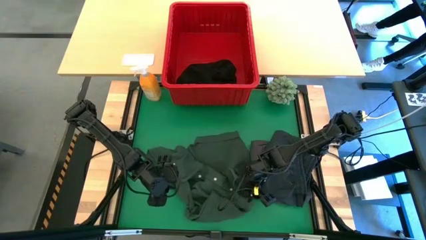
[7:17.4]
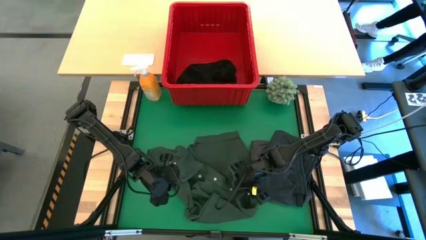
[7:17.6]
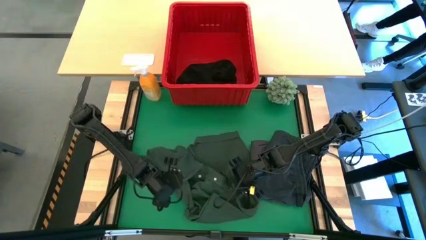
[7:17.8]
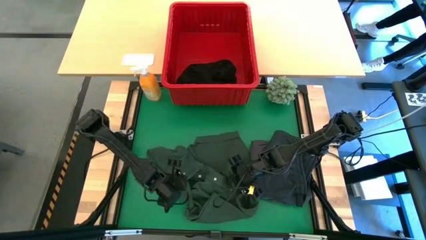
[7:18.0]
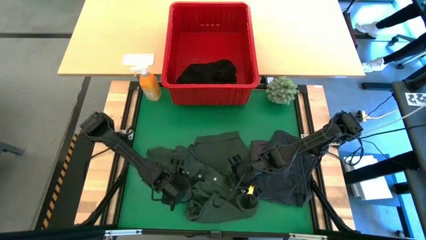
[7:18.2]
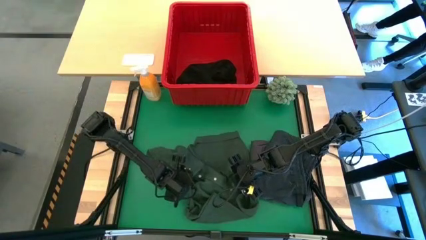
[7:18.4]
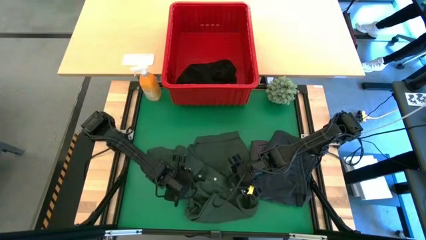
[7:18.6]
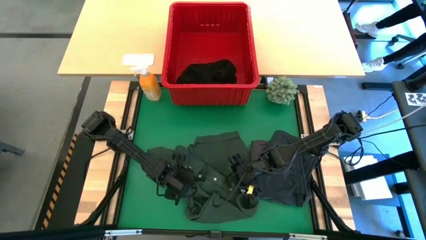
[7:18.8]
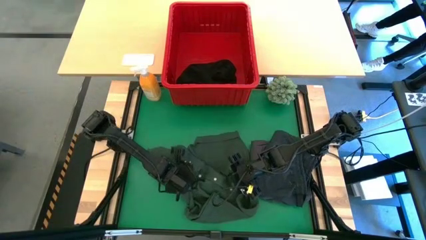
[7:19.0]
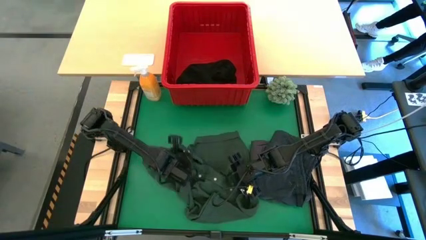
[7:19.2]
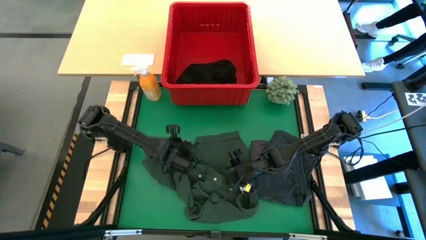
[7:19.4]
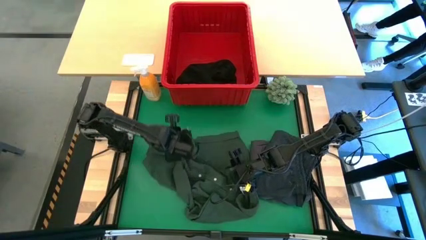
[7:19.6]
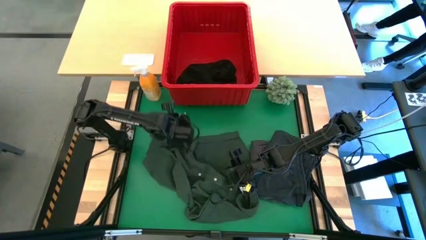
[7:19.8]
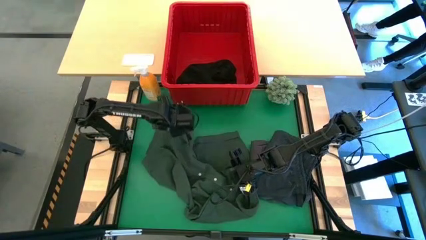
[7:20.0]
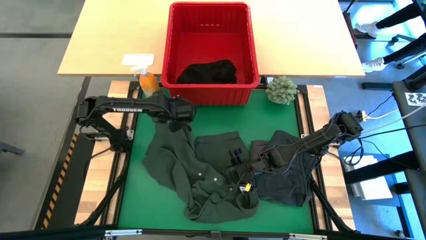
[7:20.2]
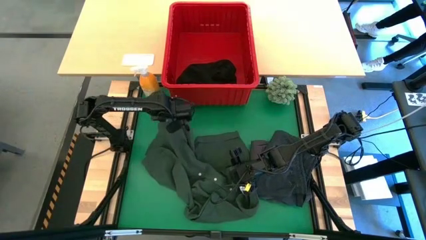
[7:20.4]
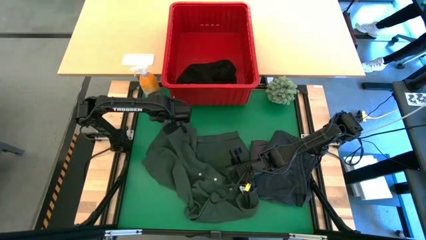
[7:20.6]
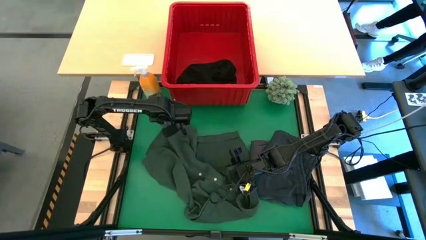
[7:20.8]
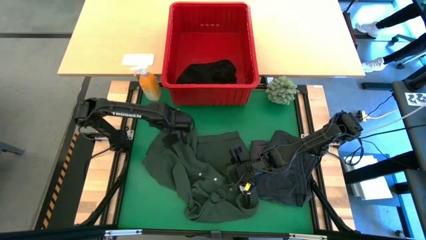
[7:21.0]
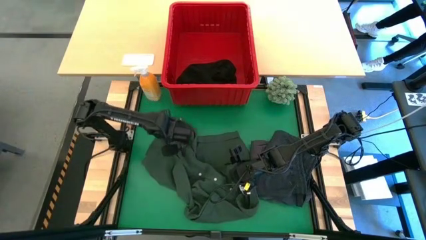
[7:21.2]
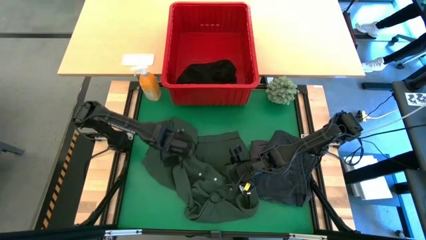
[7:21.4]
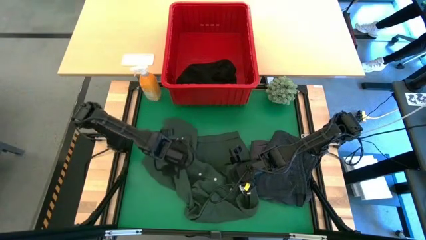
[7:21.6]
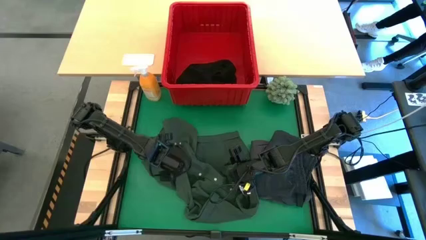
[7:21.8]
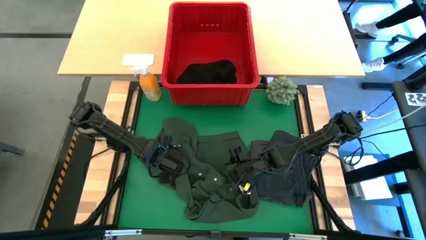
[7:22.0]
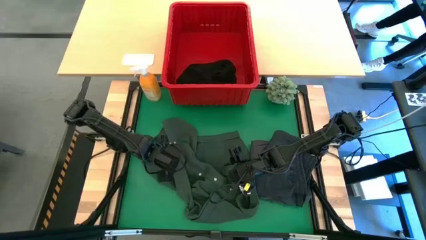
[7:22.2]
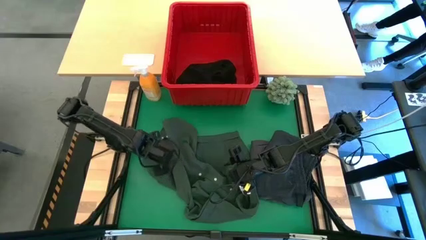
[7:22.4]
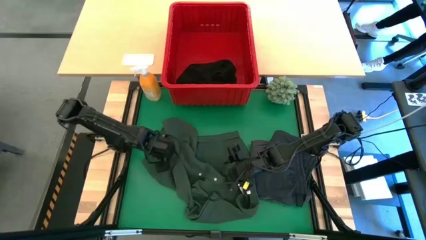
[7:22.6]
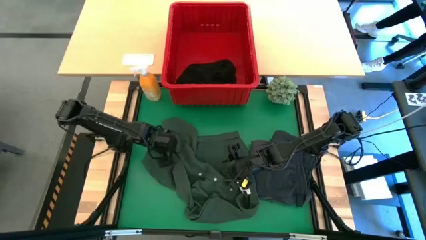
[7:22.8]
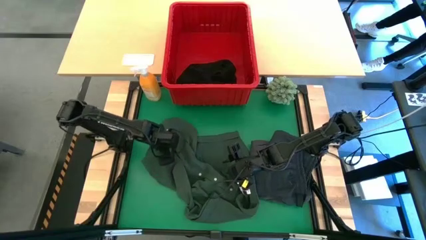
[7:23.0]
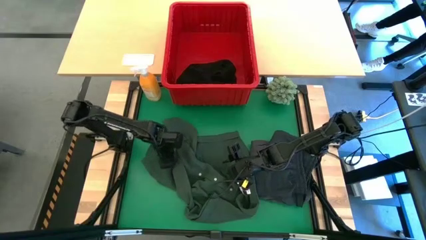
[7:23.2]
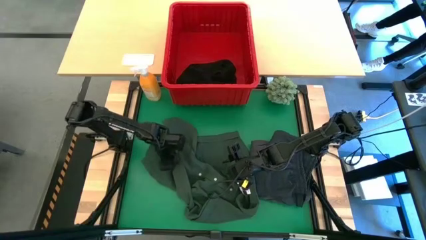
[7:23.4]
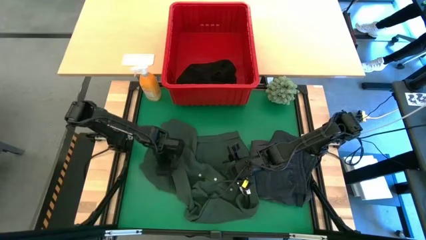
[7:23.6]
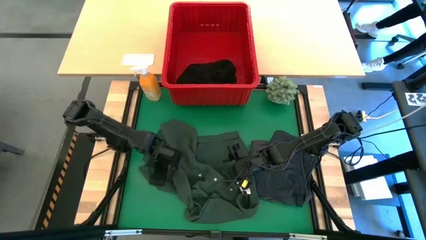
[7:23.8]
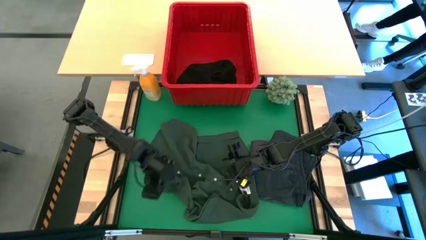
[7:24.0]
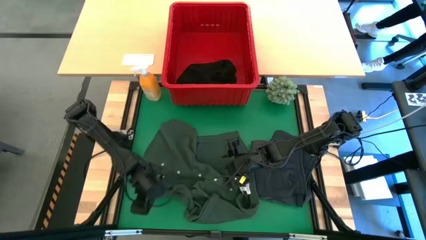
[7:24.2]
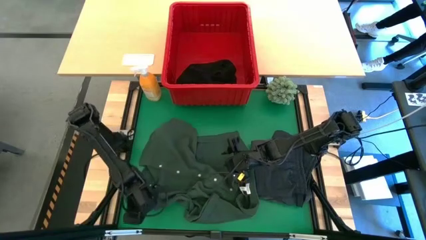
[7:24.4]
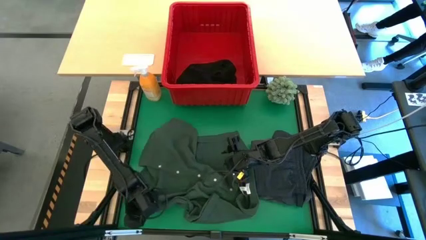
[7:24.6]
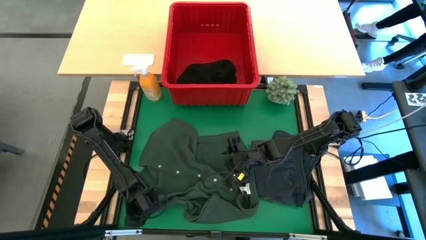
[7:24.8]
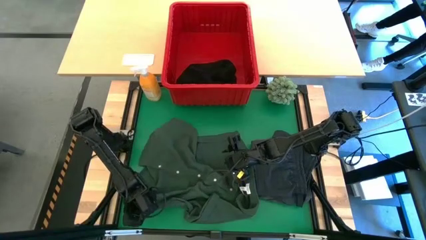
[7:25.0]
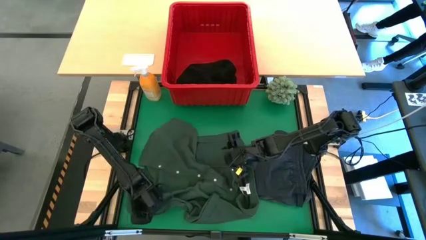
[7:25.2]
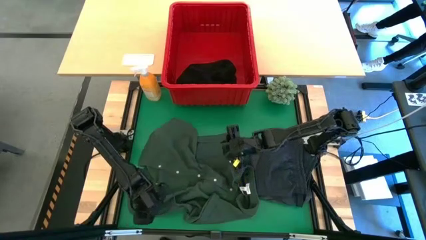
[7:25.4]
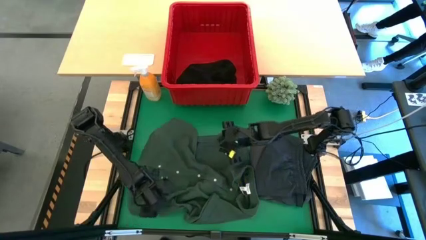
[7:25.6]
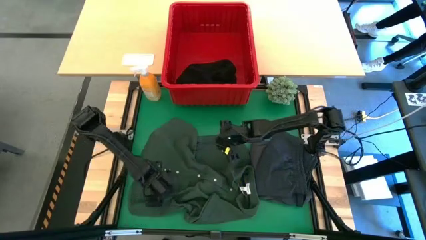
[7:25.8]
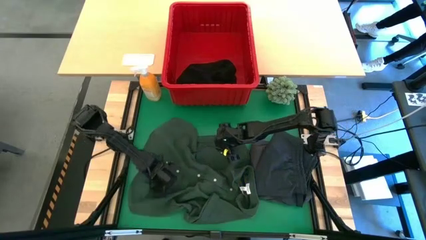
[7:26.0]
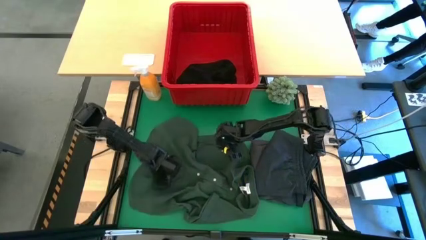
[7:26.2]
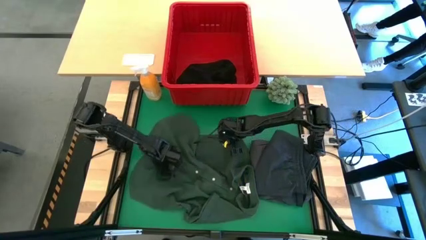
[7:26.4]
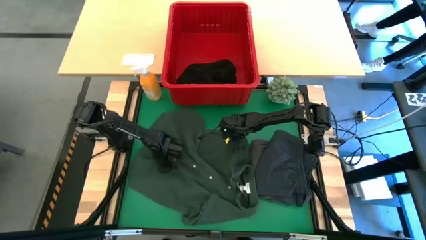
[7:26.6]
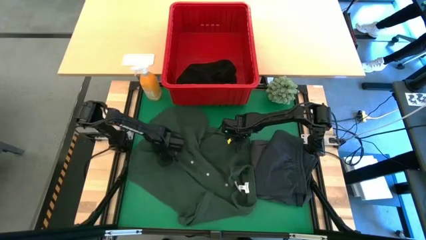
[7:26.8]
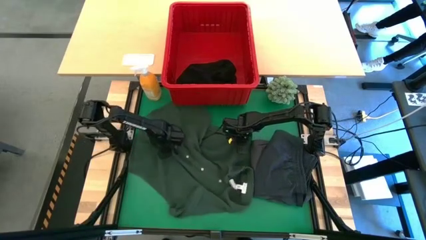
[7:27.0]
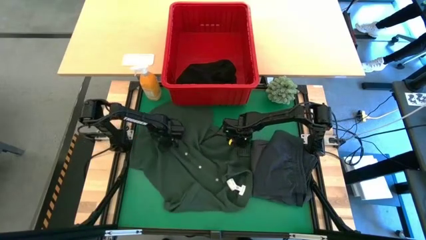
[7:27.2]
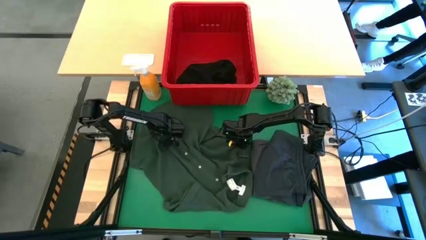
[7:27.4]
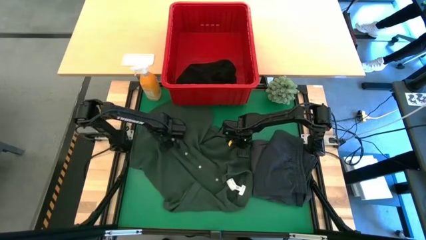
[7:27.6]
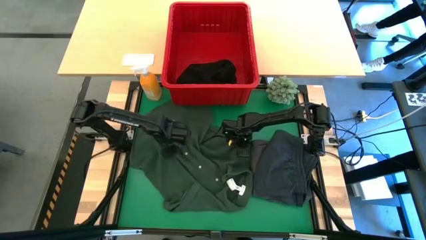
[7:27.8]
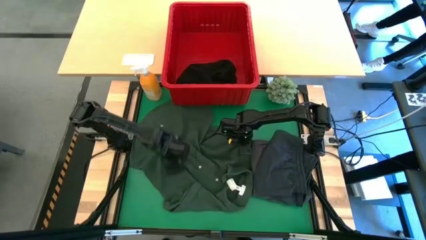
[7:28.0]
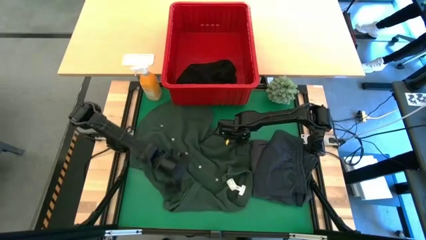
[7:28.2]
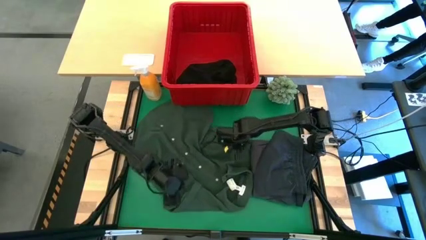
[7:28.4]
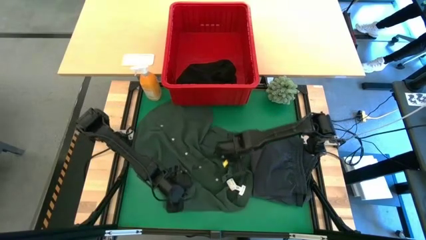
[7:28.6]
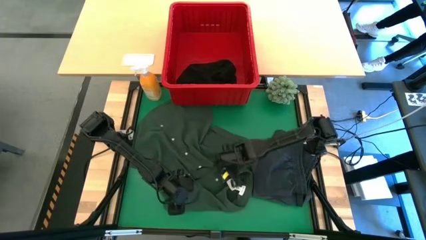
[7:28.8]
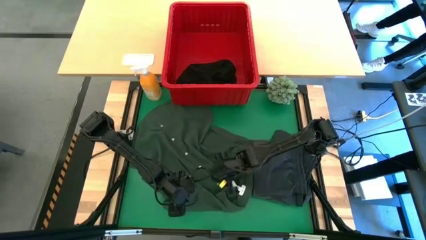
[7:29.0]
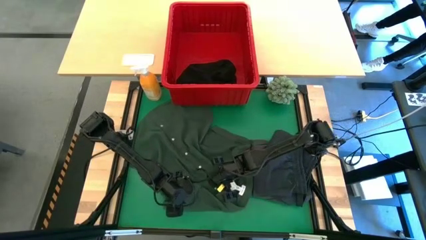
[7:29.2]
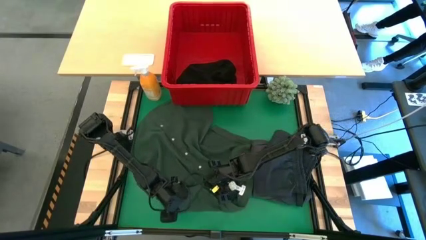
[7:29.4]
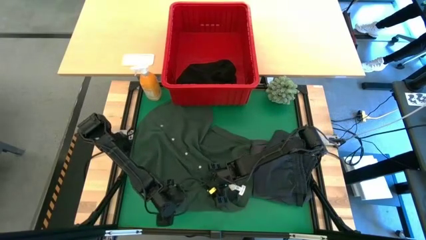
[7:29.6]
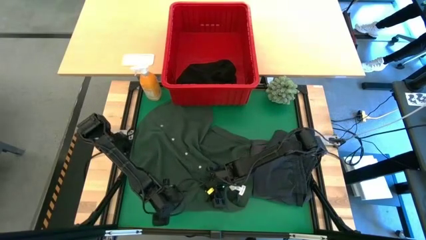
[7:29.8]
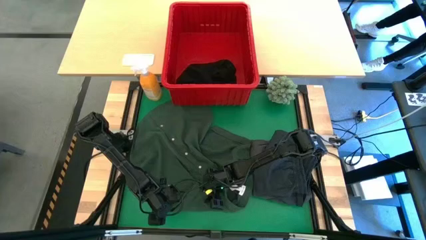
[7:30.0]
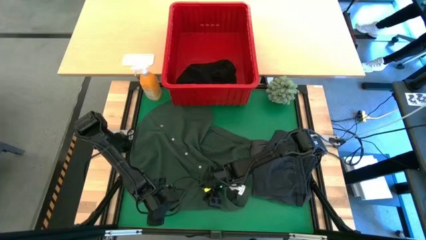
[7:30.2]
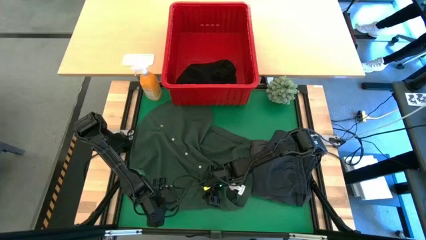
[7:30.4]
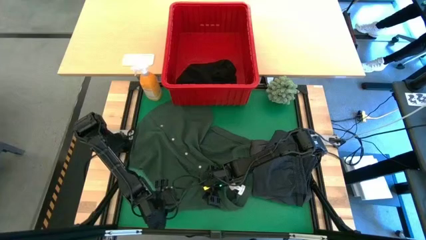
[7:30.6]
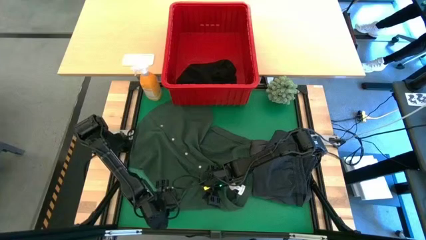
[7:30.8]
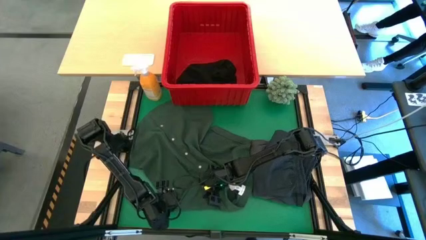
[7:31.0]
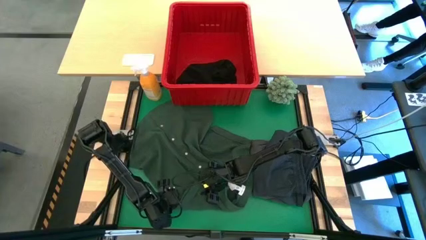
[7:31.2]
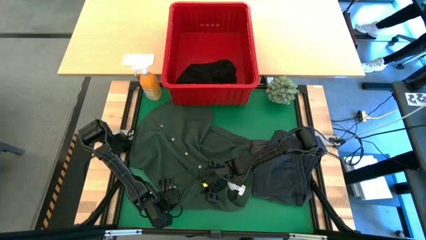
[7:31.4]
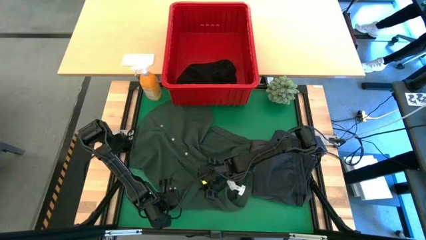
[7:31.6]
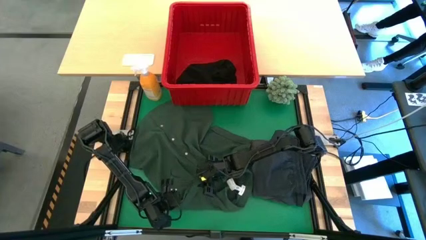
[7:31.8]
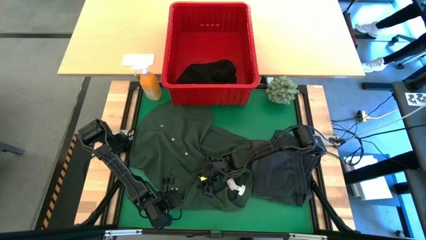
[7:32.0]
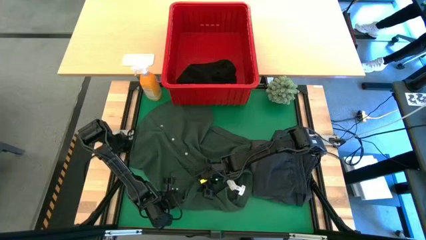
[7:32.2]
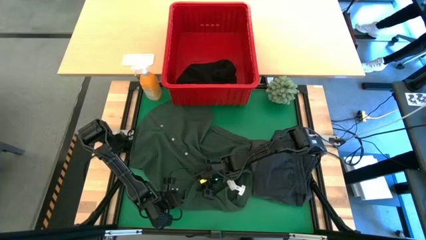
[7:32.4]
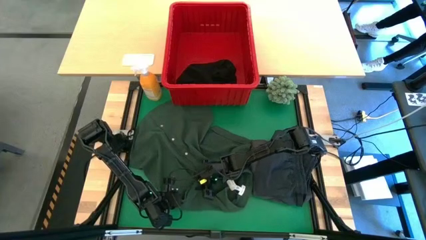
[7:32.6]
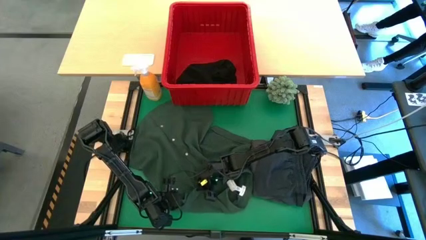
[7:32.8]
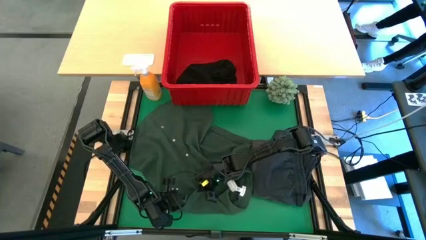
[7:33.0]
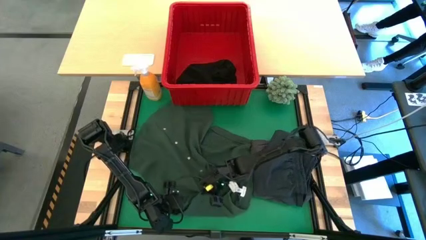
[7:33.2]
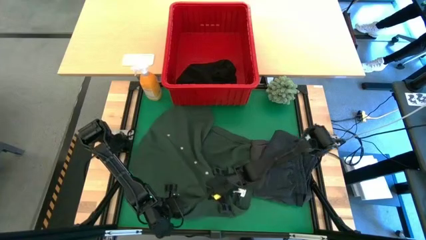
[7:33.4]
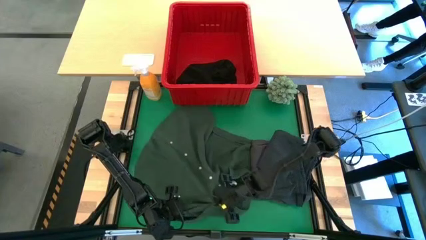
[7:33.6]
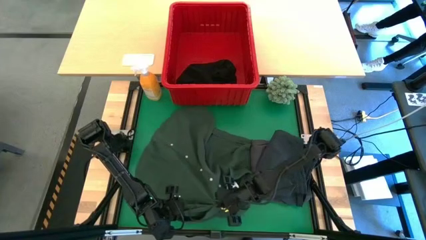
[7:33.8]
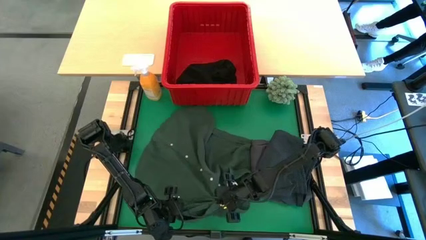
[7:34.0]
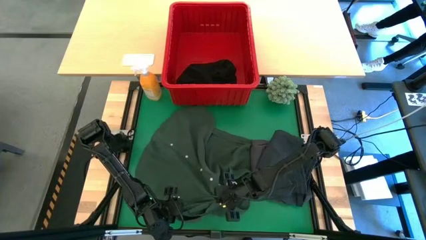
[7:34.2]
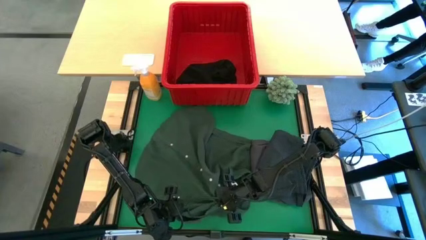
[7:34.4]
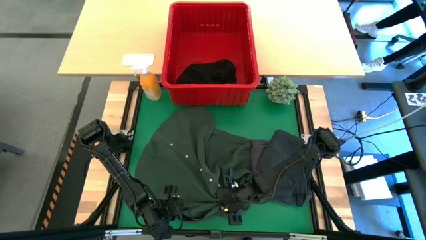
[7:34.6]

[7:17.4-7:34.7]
Task: Fold Laundry from Bin
Fold the green polo
